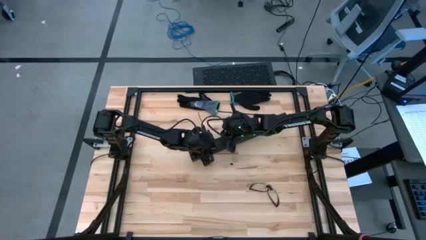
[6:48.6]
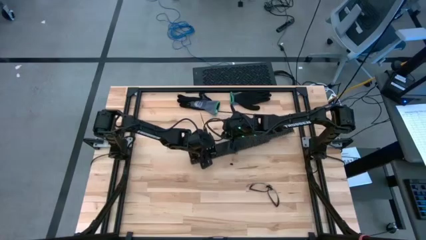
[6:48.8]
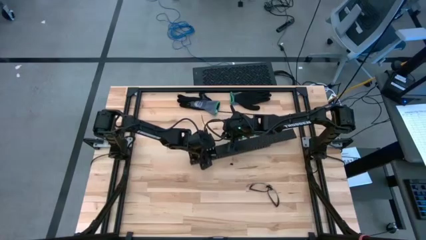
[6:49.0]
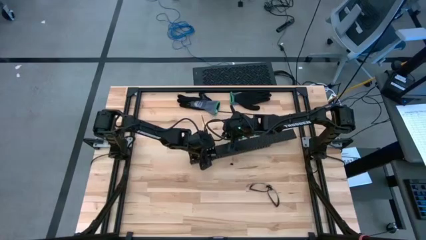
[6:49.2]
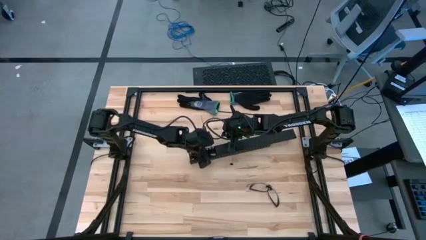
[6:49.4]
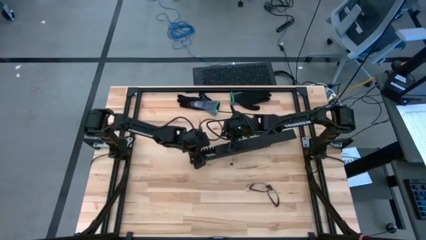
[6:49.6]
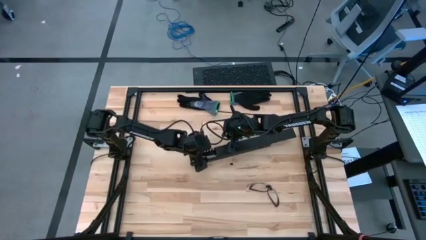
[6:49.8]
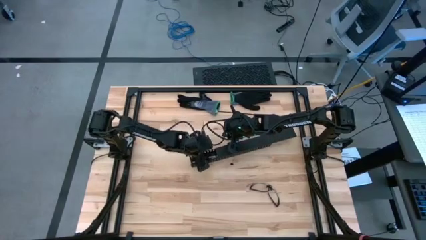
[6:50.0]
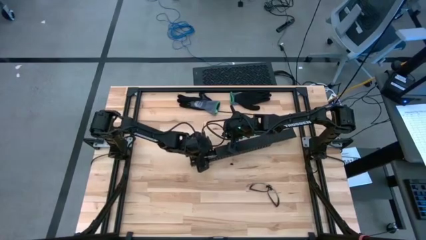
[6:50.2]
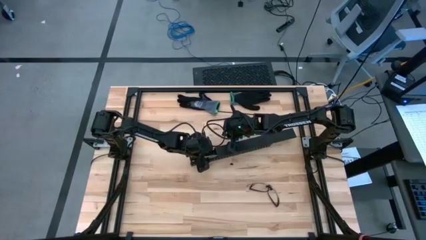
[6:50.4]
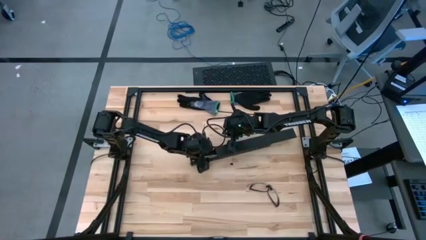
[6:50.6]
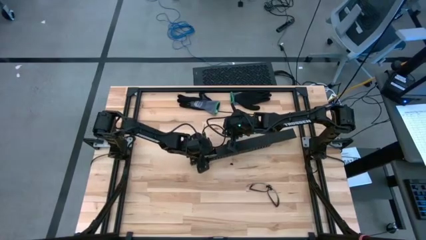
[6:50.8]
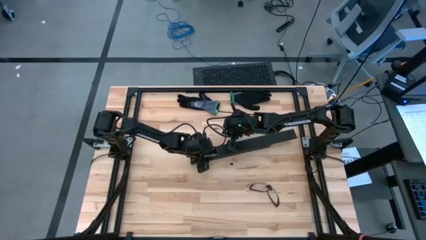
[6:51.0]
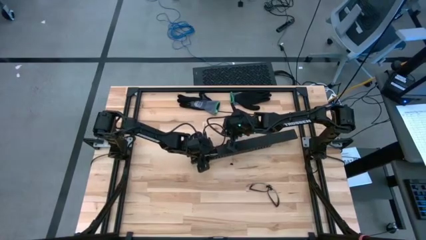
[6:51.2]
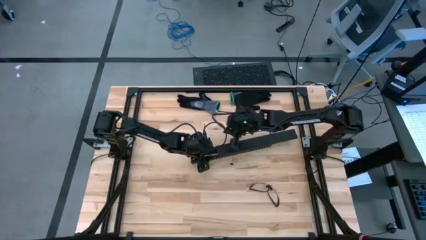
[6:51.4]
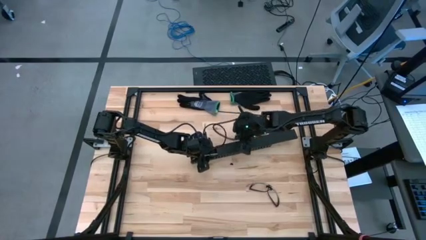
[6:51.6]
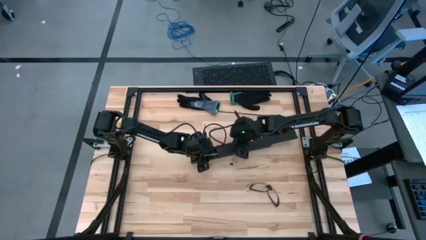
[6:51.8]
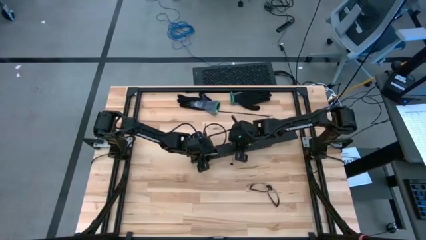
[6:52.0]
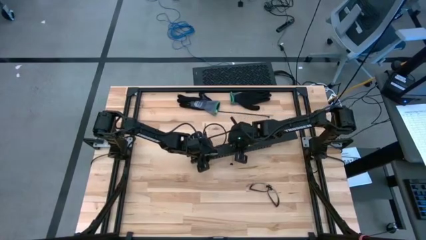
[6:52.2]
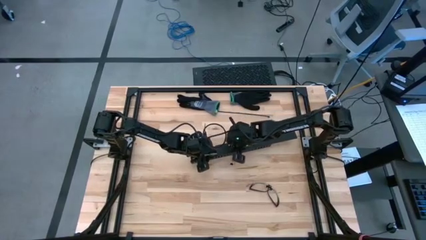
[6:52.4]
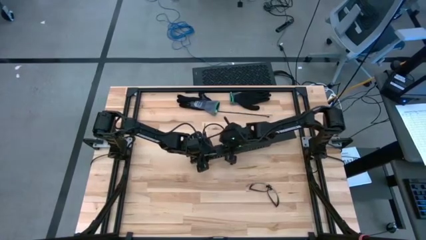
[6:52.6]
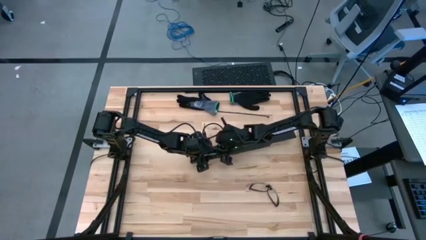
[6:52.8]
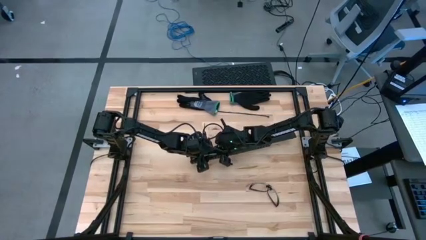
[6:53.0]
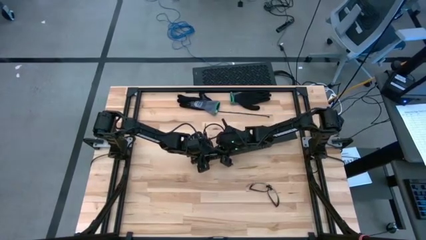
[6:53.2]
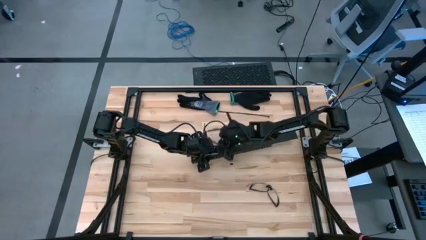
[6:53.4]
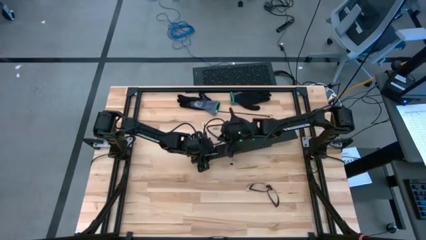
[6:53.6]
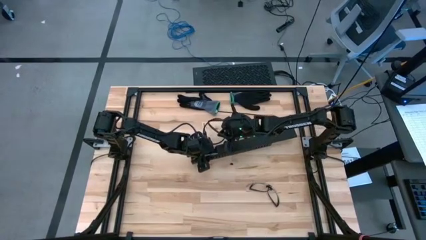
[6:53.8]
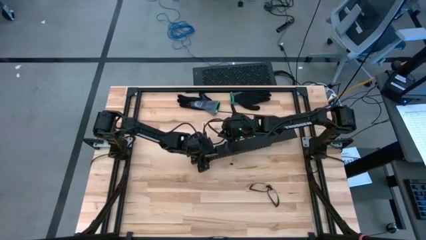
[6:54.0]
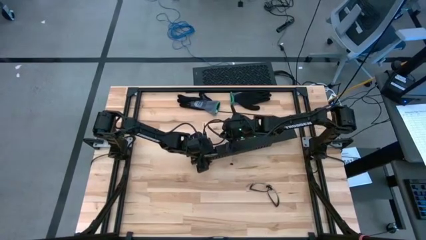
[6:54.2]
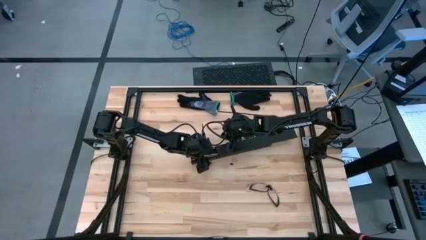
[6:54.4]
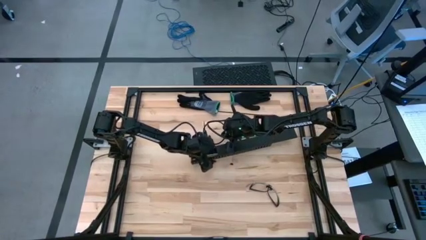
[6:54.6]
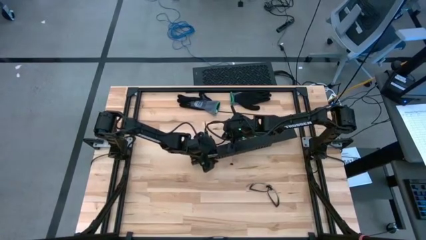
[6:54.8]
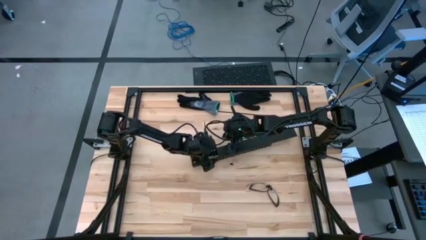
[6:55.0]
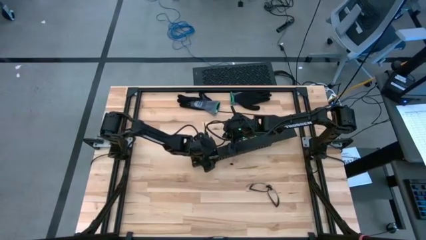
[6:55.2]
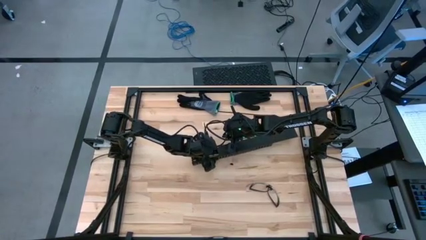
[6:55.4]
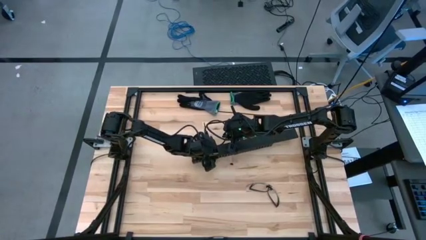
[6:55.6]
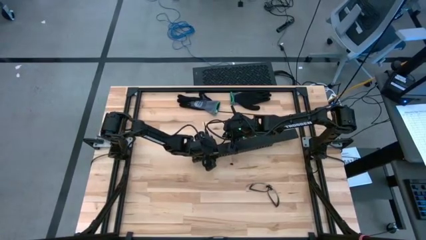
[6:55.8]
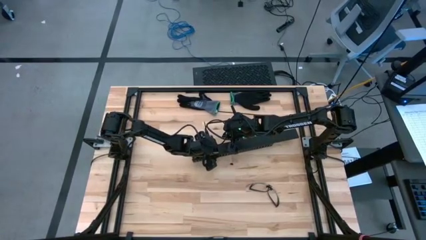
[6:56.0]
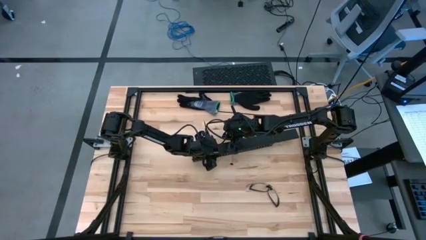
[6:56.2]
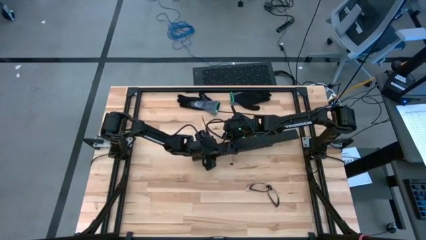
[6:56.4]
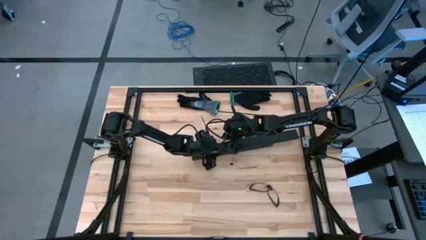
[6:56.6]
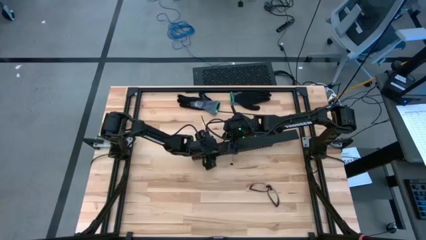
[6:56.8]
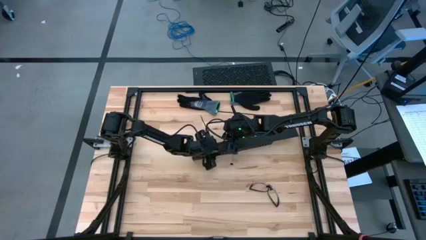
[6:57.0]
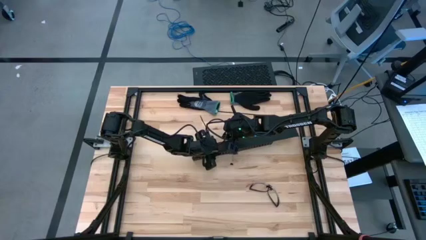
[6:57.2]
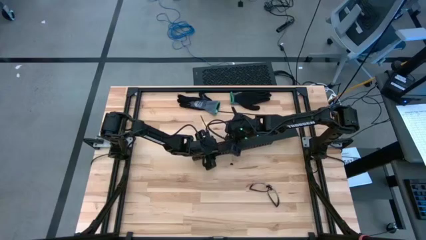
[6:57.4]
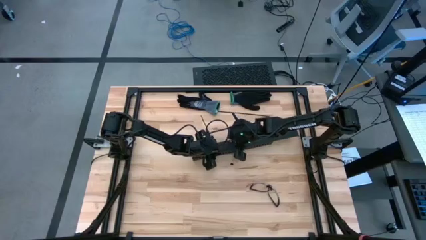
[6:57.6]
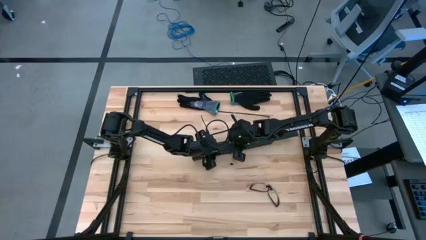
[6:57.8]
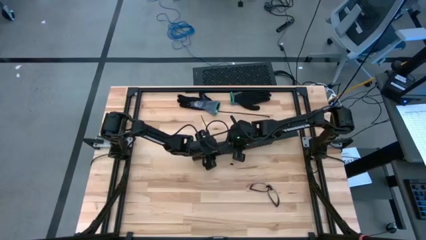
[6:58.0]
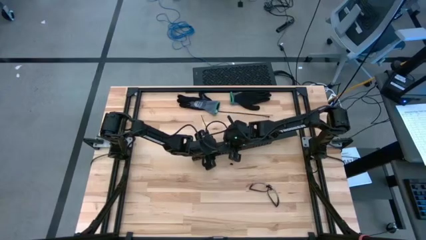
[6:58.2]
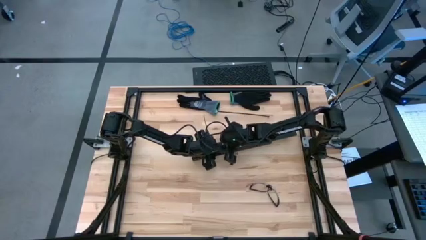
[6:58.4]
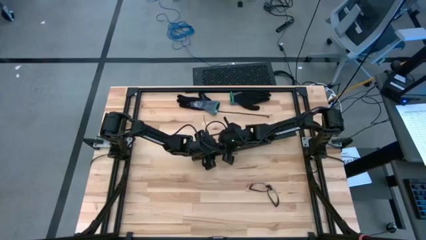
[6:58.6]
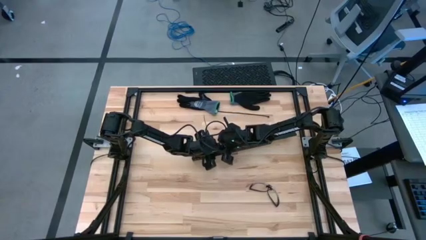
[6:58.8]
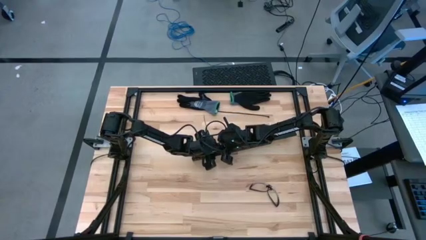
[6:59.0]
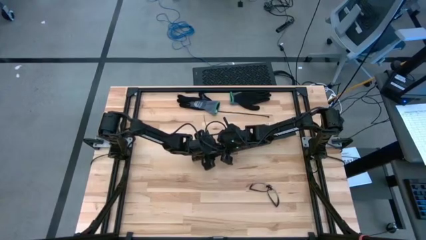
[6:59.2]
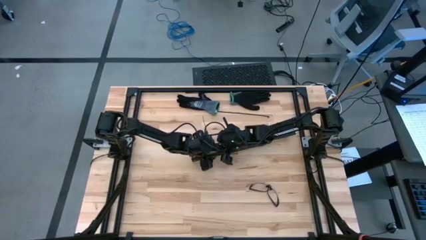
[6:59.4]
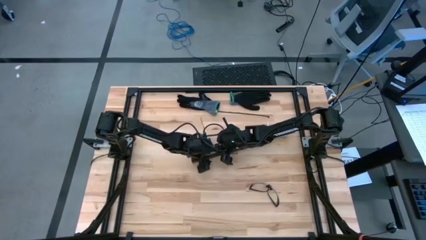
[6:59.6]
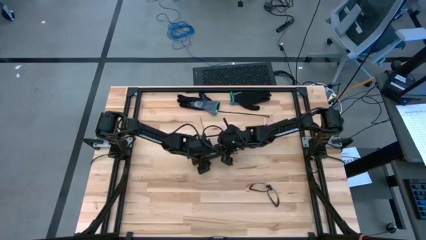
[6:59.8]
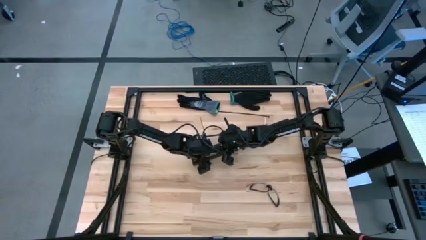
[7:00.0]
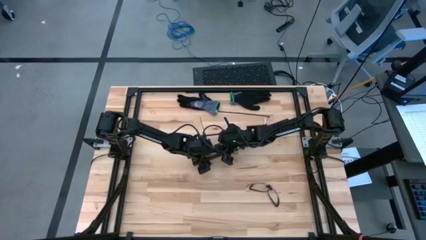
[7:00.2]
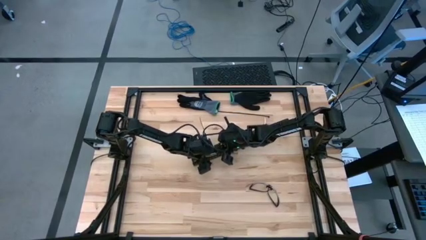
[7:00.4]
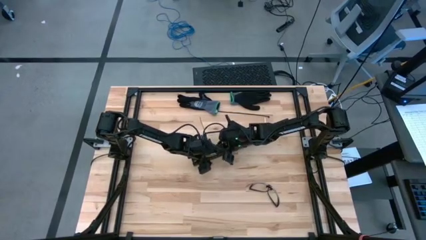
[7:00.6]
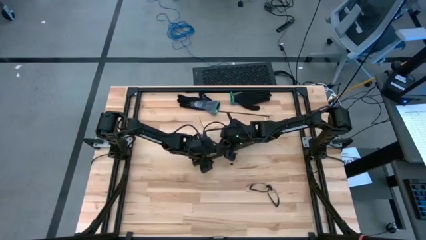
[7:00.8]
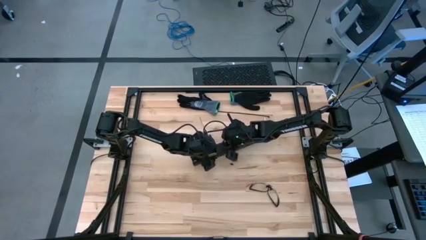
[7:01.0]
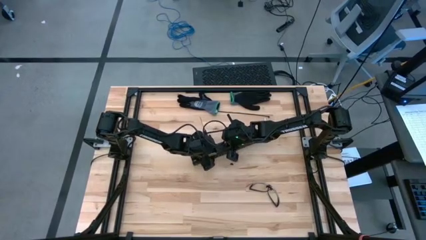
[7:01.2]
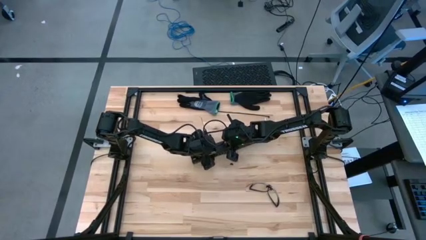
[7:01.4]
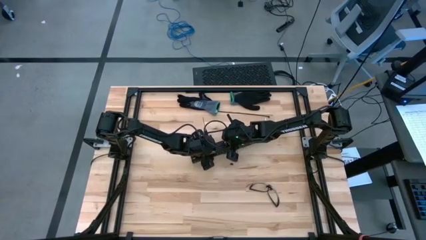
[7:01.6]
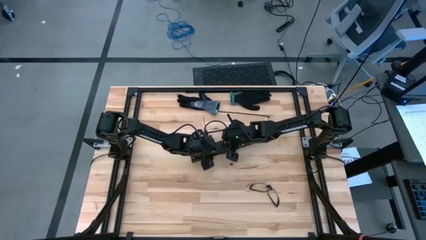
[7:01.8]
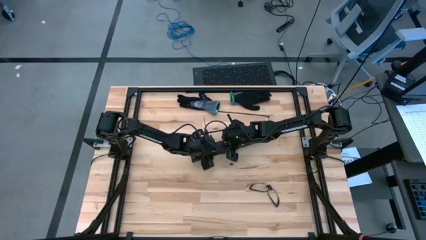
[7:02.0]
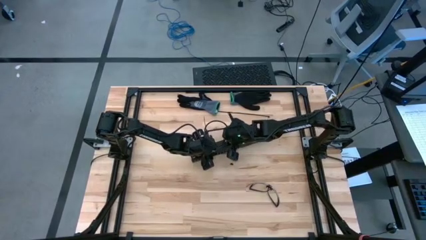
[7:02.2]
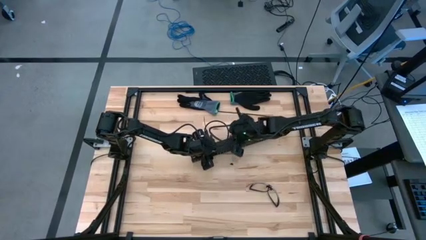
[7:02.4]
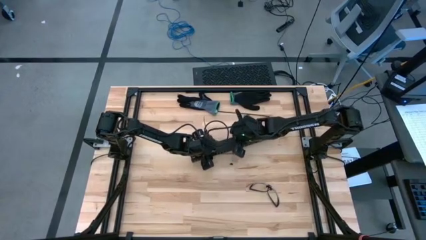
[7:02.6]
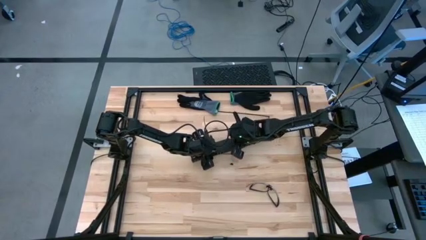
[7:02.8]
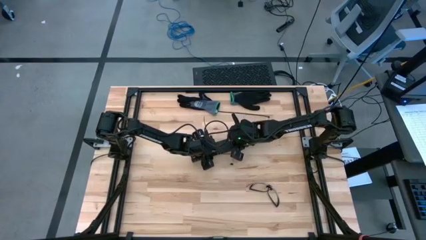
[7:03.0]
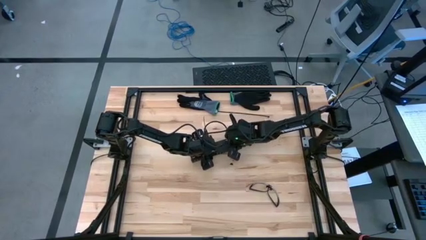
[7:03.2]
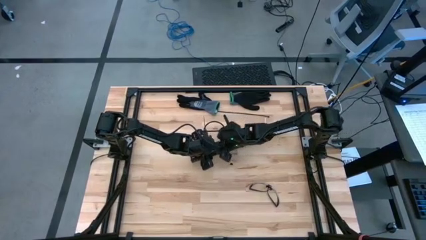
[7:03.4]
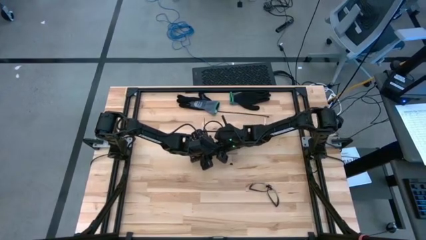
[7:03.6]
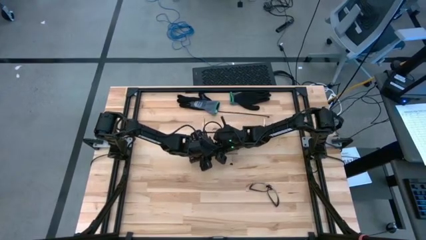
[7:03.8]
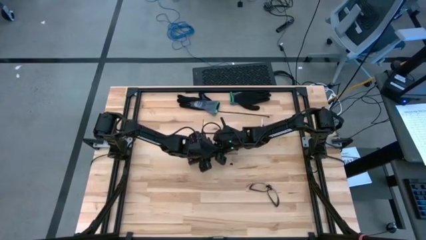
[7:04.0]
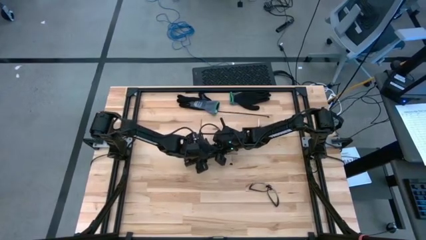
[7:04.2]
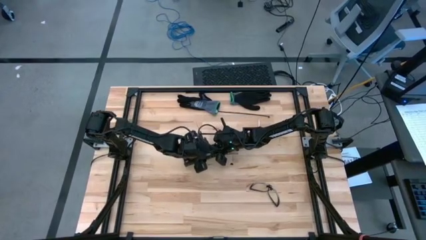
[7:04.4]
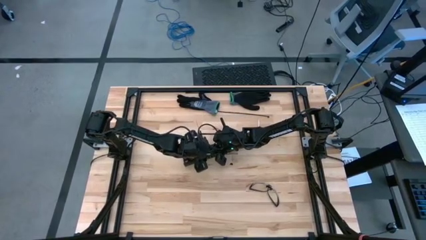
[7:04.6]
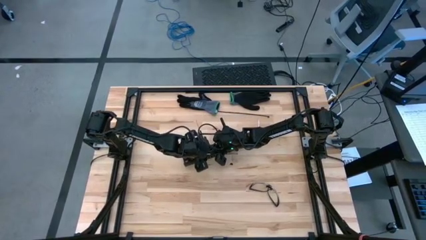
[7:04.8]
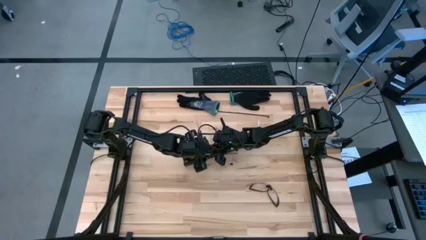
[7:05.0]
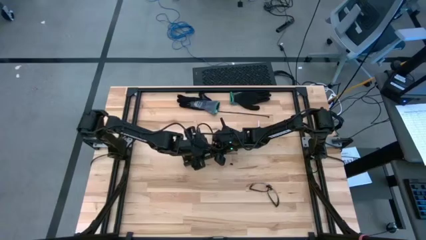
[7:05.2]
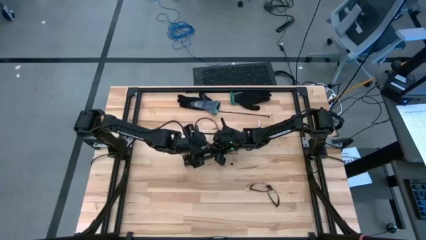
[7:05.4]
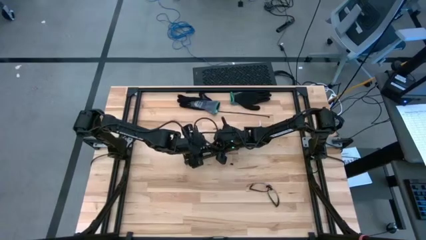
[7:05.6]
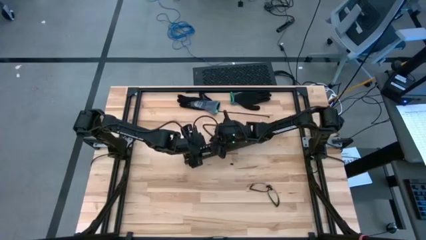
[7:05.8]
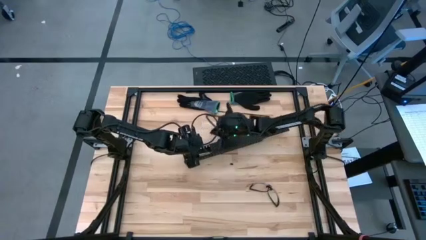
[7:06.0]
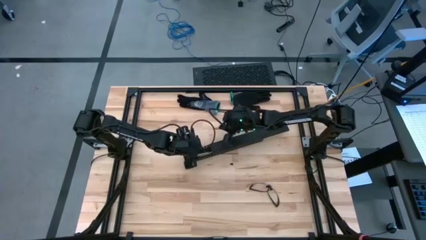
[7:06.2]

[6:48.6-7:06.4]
Task: Ziptie cables
Close the black cable duct
